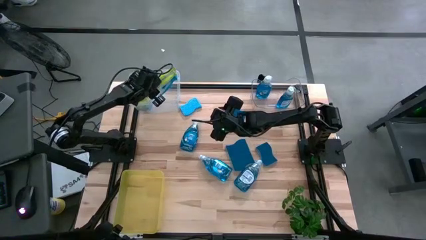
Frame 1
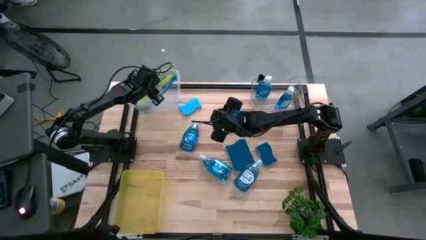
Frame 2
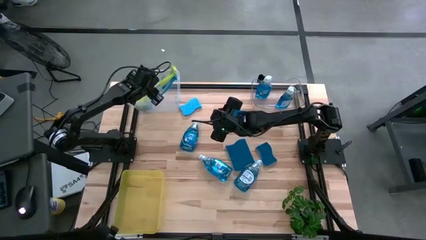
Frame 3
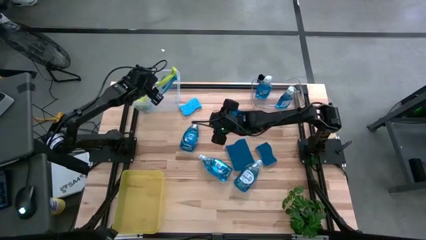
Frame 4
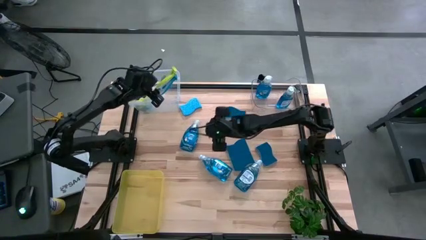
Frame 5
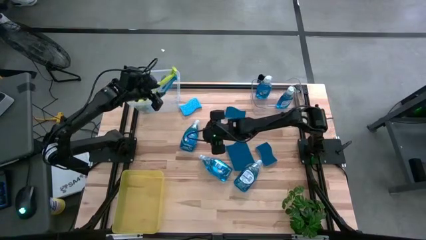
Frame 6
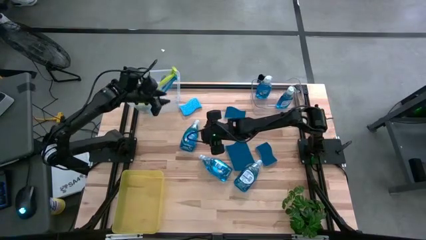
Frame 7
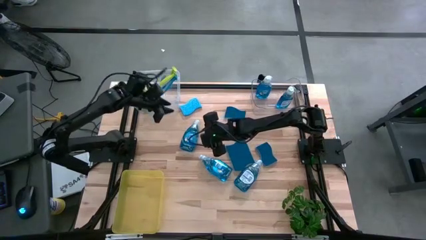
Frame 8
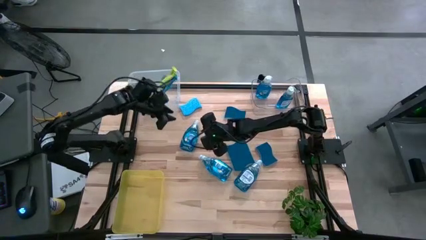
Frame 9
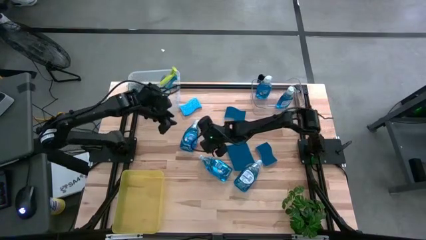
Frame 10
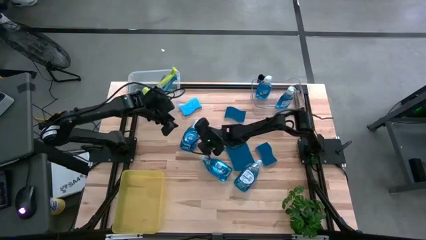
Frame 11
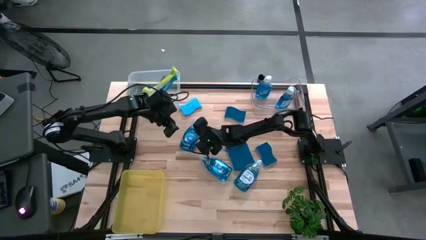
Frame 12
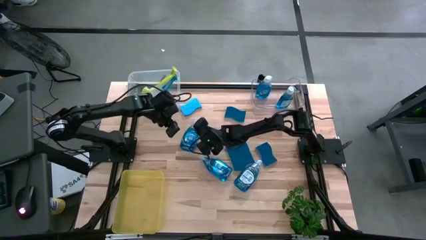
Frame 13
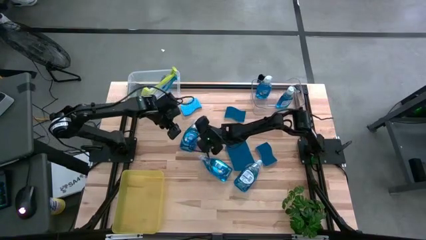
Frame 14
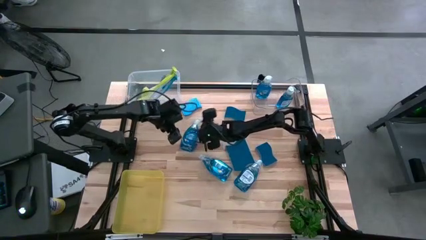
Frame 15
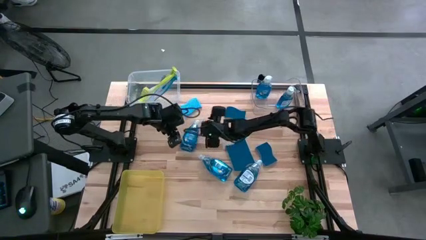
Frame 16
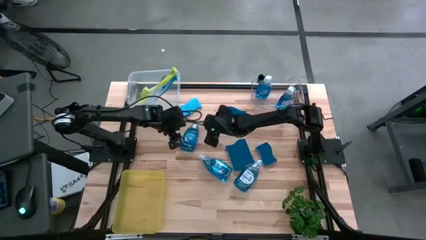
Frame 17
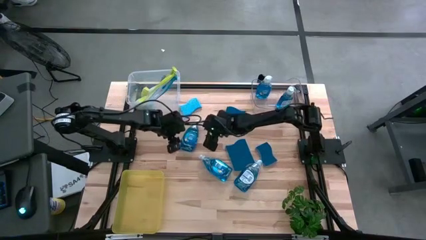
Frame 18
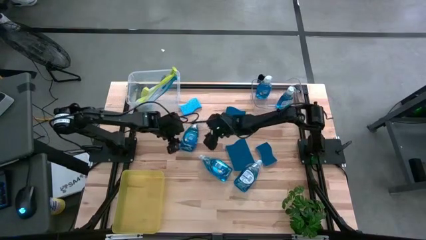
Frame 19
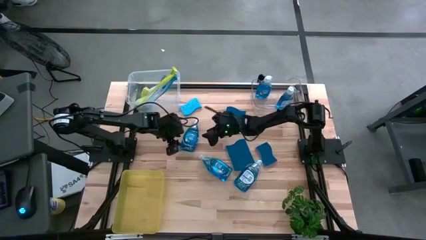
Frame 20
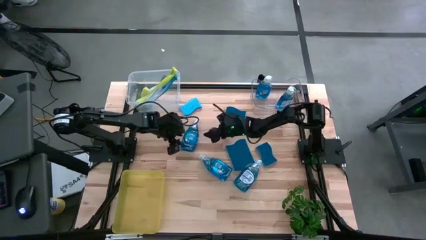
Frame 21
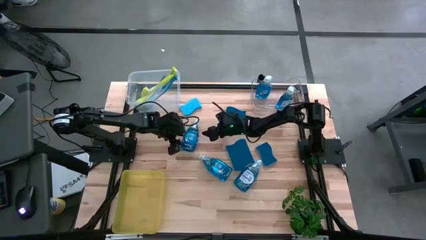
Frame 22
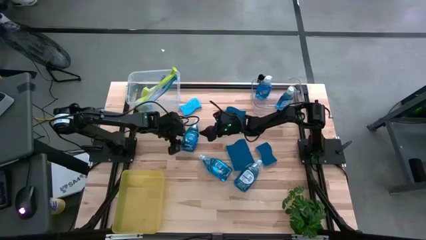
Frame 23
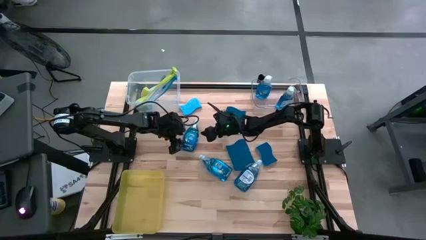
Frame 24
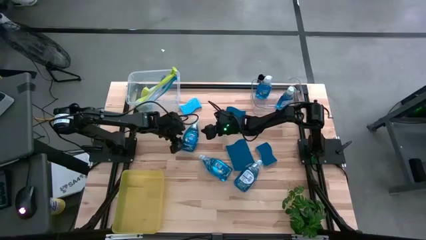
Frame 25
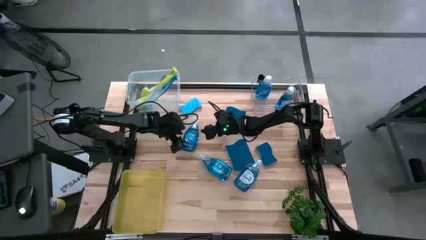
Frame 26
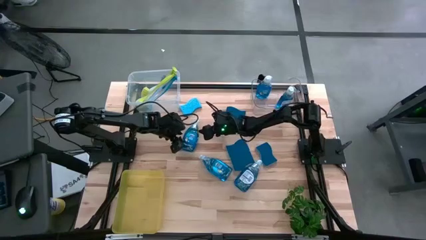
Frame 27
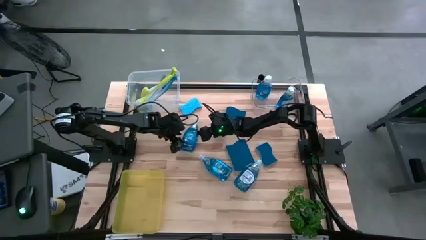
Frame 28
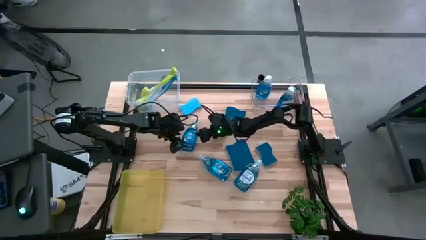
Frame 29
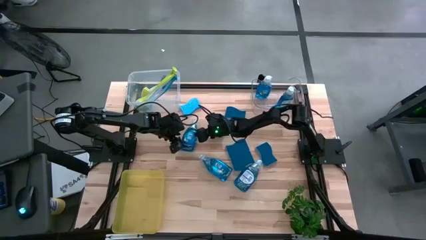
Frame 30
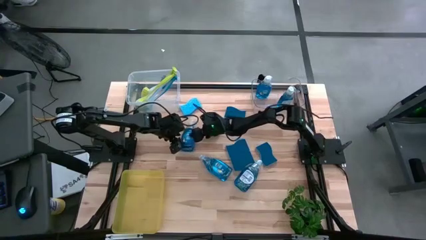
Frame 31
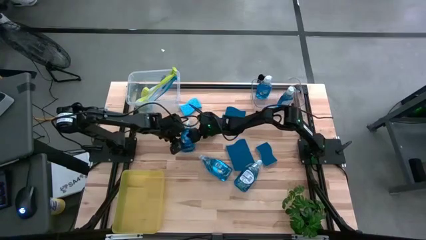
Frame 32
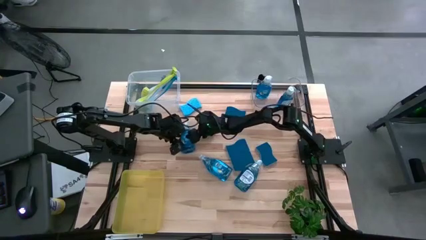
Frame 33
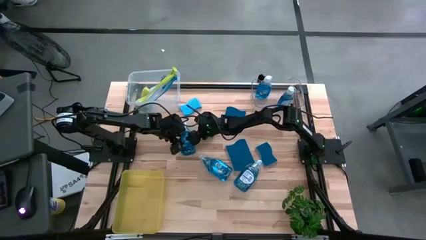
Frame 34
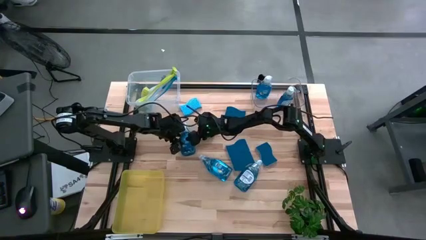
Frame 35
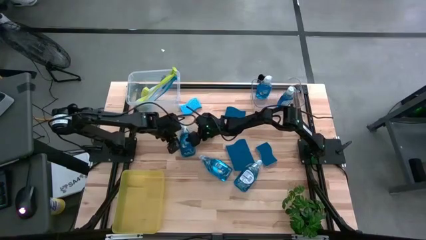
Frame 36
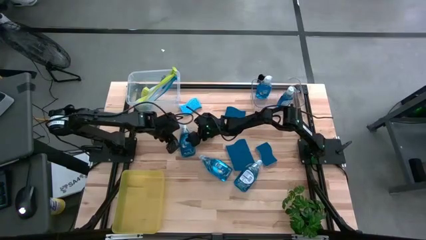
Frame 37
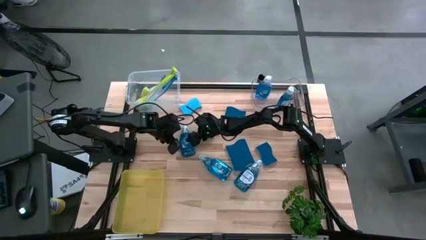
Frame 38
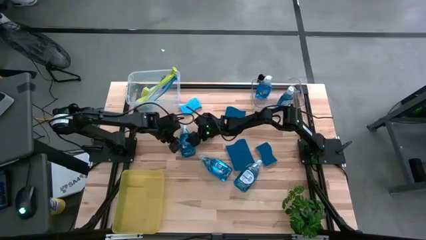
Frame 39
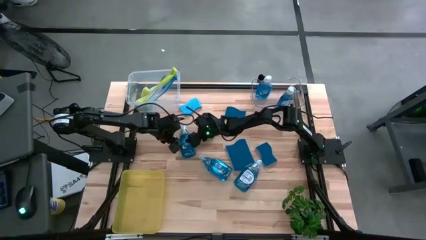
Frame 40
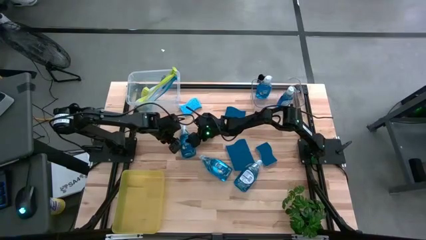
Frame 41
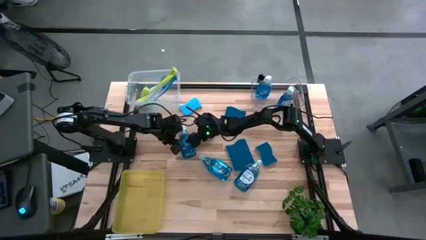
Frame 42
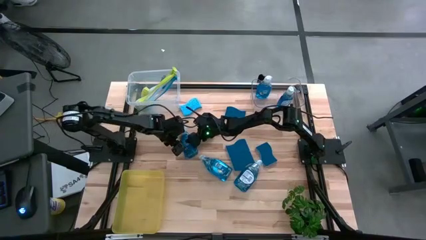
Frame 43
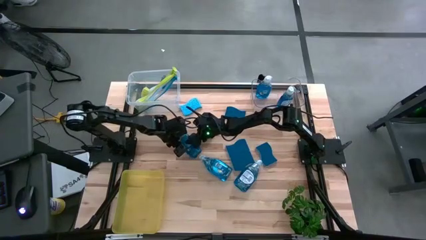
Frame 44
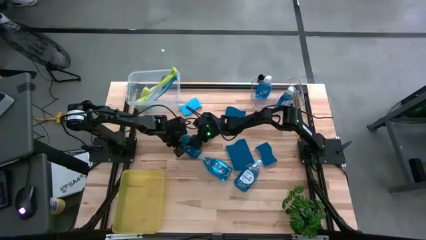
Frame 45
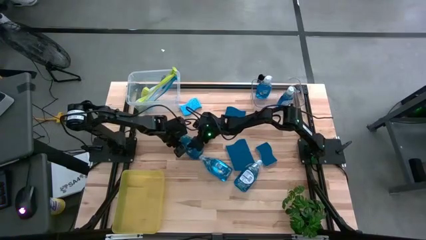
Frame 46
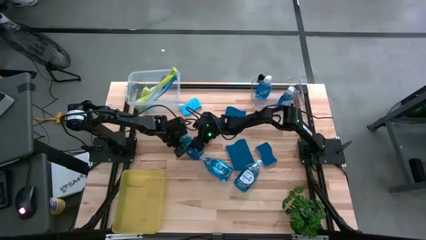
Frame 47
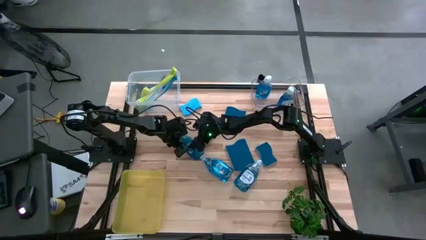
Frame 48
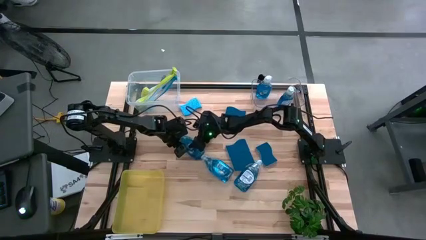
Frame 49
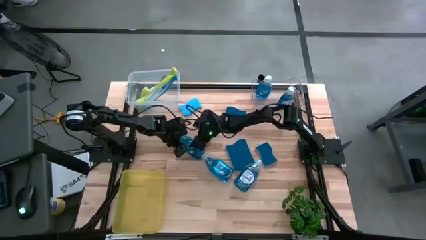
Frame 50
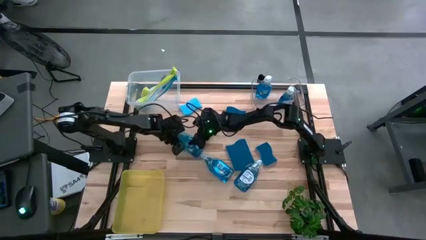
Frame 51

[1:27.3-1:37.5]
Task: Pick & Place Kitchen Sink Supplies
Put the top soap dispenser into the transparent bin

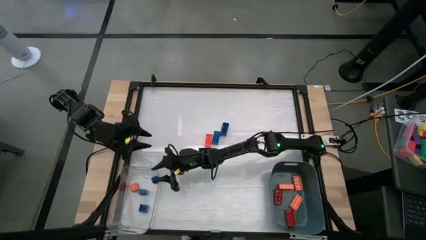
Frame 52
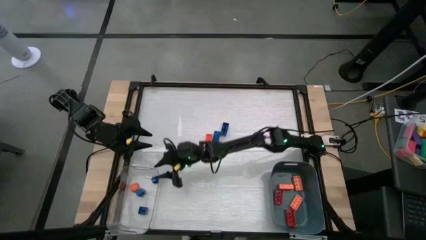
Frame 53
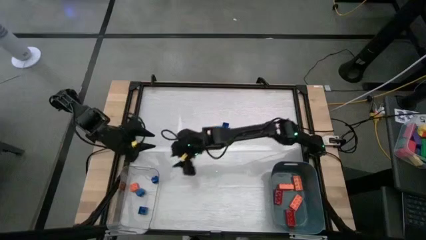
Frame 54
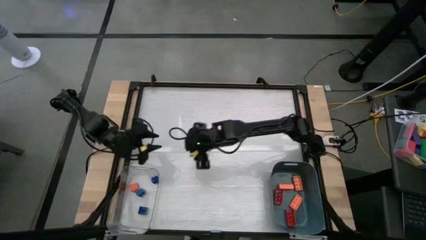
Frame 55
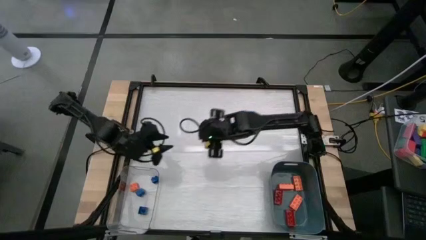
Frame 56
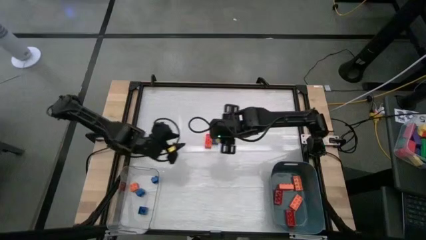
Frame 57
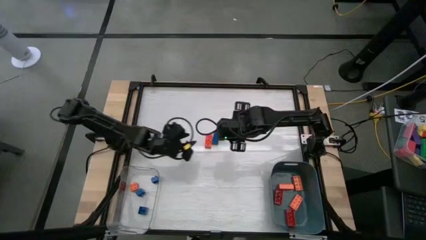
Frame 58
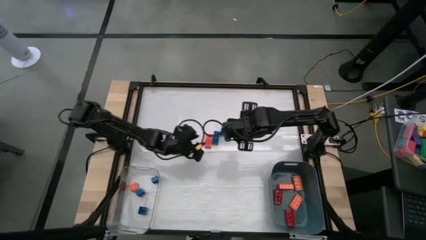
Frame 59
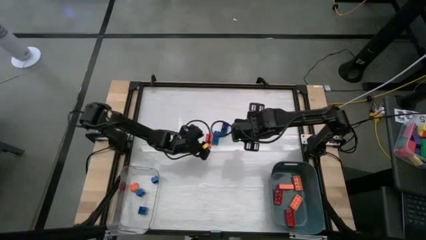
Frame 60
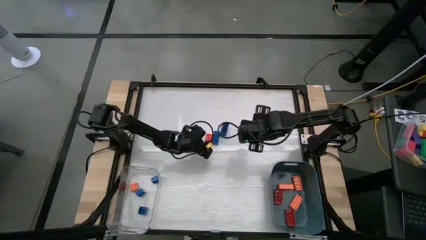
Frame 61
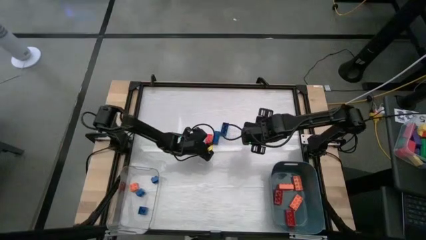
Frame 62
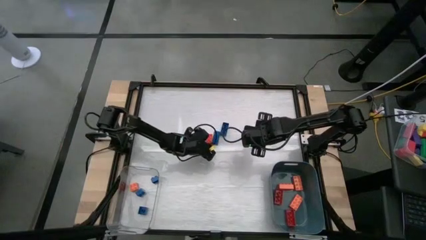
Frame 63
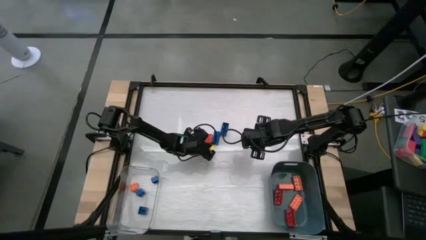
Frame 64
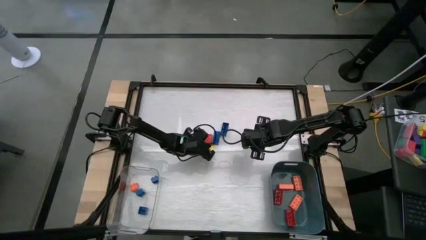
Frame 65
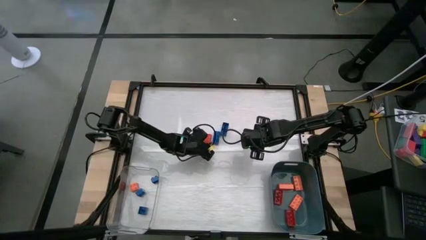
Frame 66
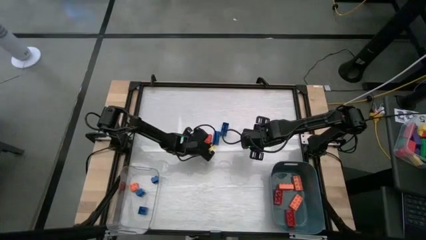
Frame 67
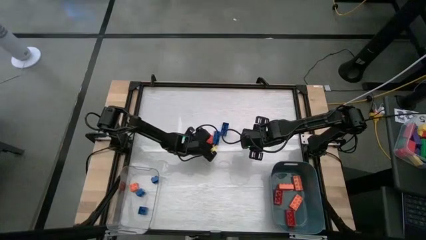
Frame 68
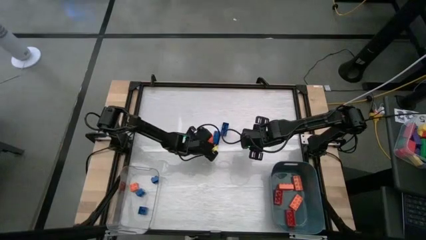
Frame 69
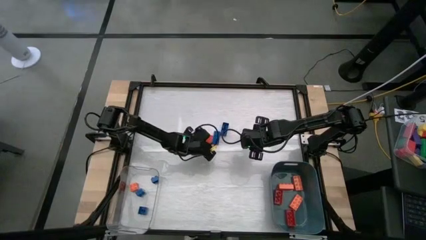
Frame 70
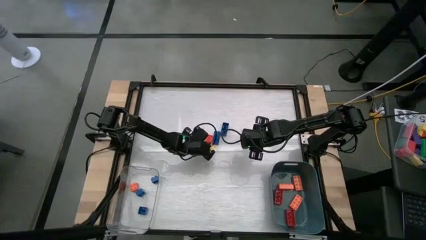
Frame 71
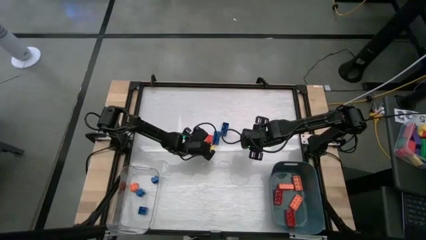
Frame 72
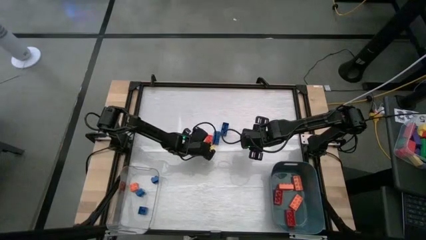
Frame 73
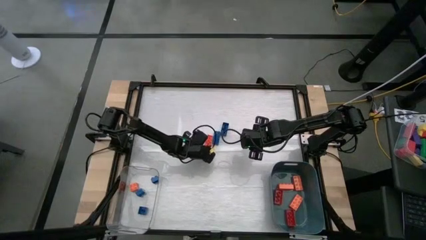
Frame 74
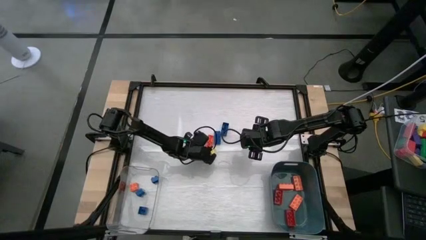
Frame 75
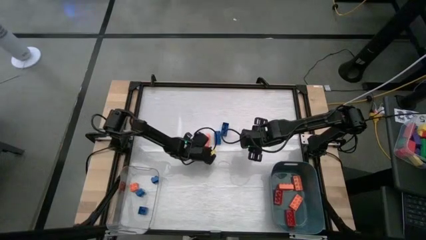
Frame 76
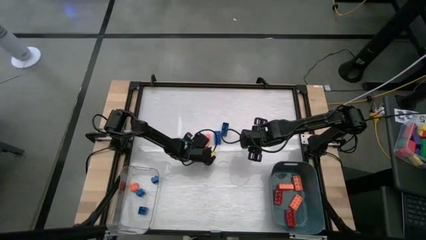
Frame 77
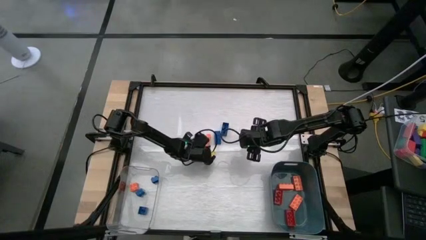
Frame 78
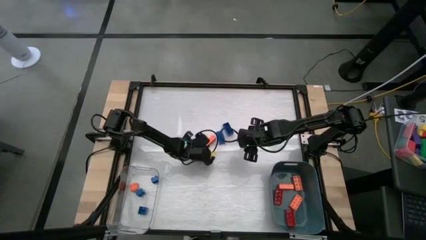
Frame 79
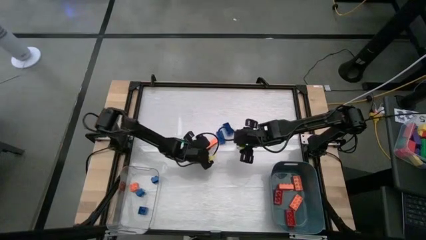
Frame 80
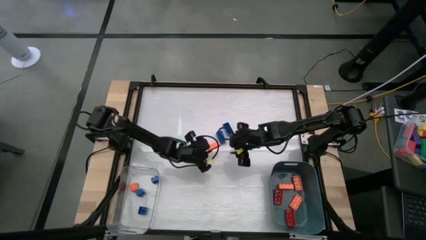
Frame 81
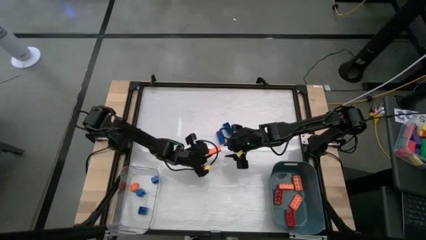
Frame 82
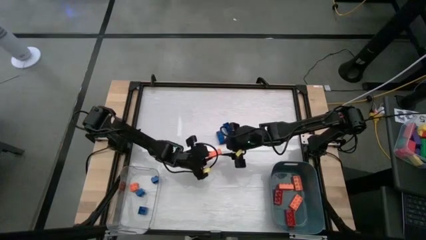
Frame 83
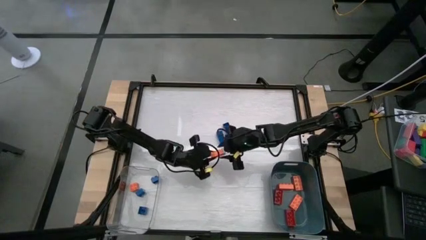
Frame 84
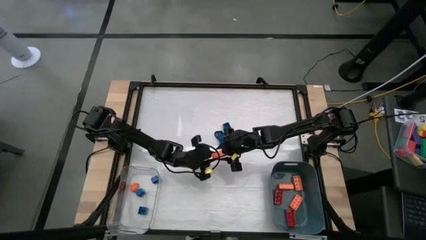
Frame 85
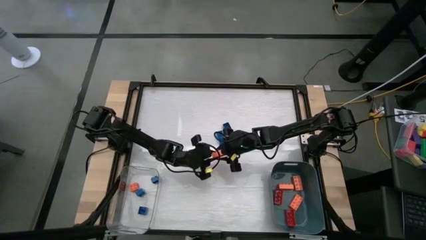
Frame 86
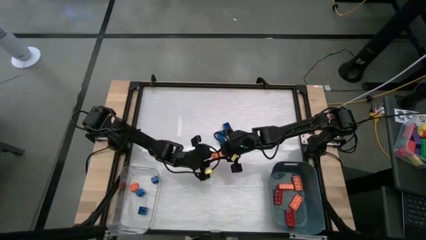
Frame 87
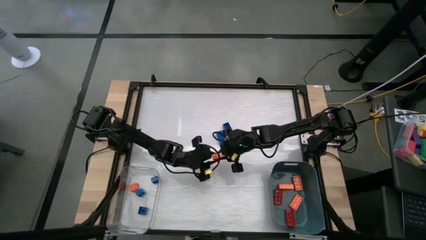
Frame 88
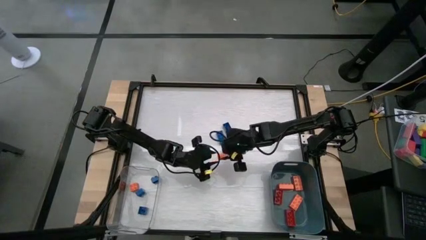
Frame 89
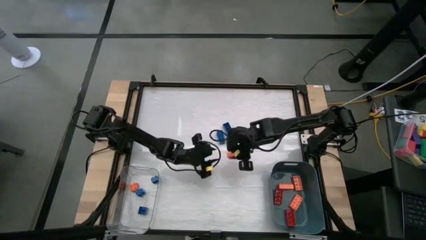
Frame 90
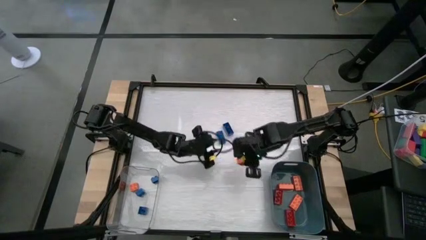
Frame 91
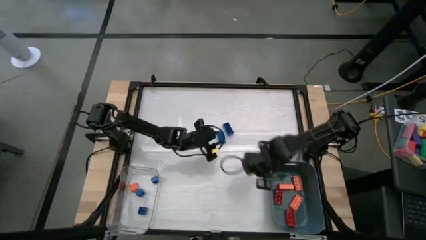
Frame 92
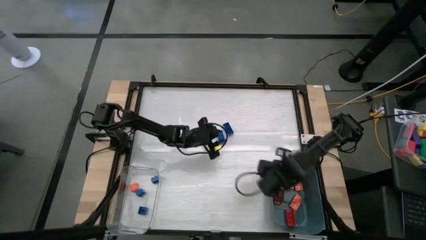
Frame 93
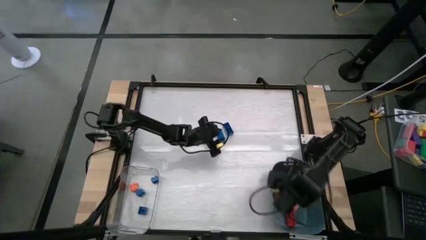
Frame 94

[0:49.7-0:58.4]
Task: Sort blocks by size
Put the large orange game piece into the blue bin
